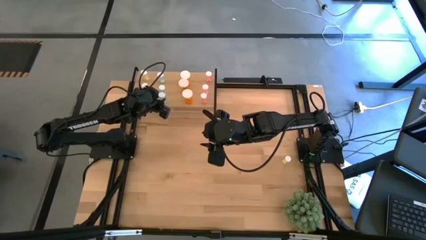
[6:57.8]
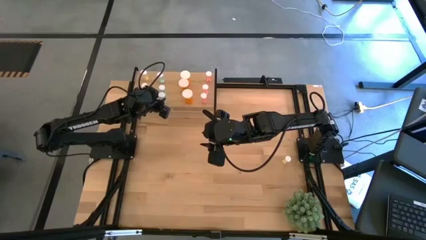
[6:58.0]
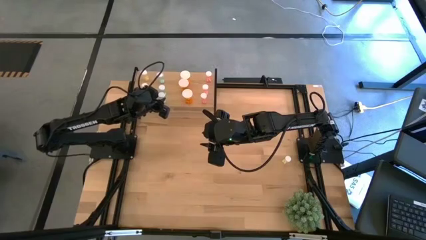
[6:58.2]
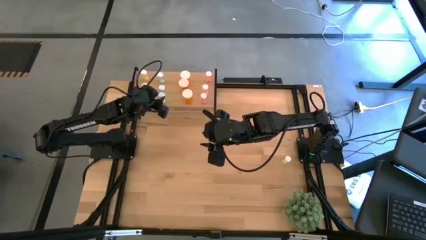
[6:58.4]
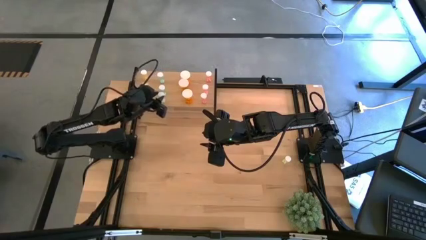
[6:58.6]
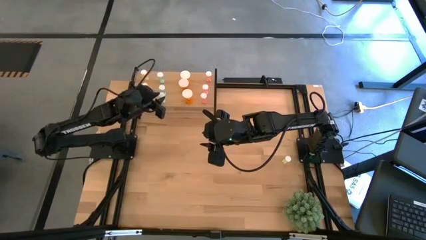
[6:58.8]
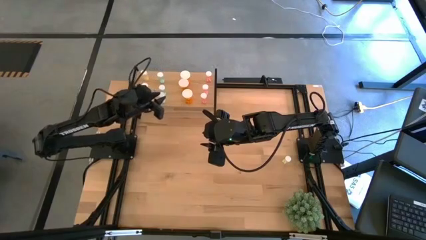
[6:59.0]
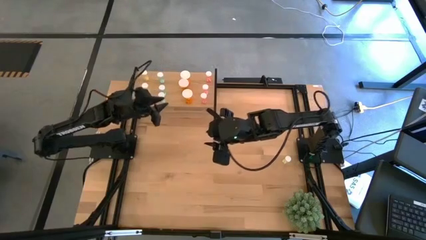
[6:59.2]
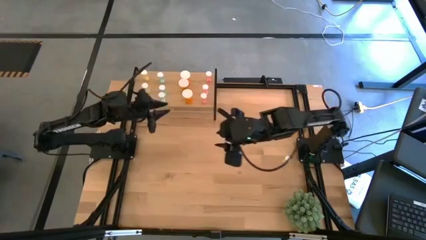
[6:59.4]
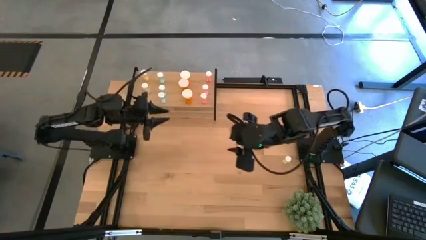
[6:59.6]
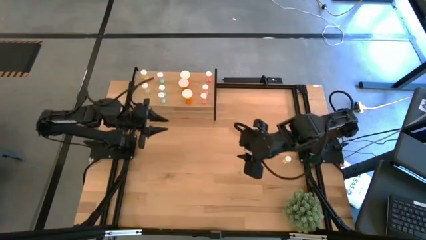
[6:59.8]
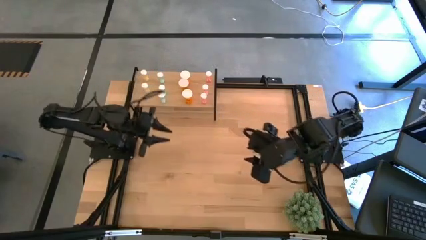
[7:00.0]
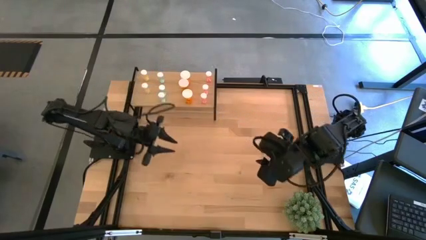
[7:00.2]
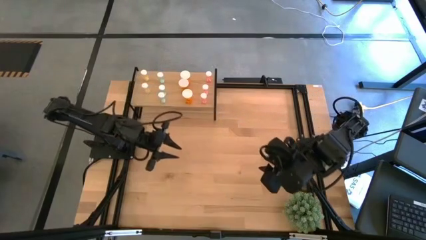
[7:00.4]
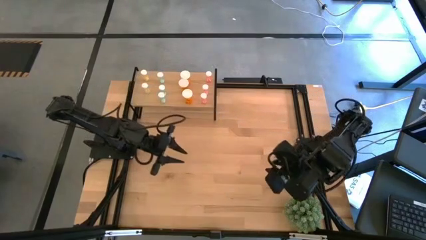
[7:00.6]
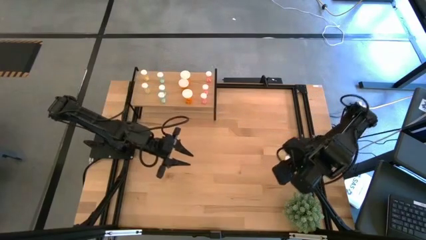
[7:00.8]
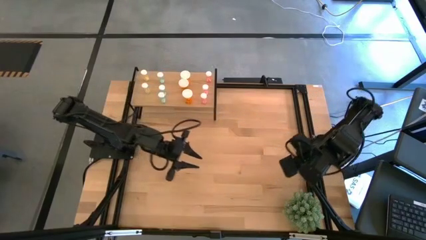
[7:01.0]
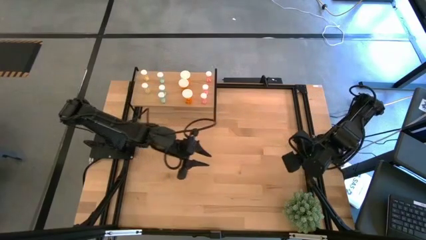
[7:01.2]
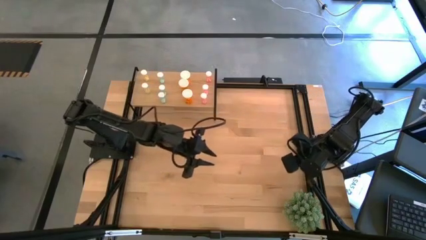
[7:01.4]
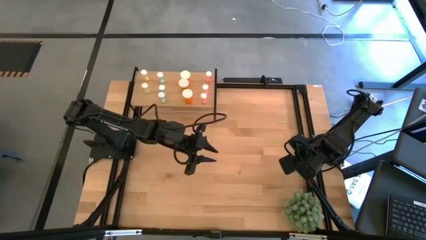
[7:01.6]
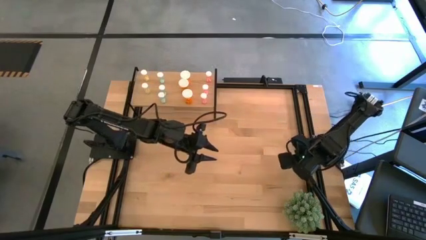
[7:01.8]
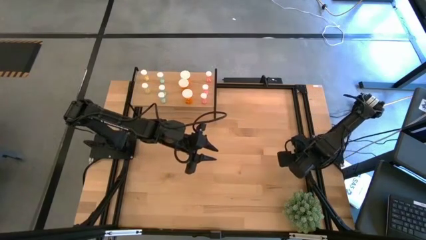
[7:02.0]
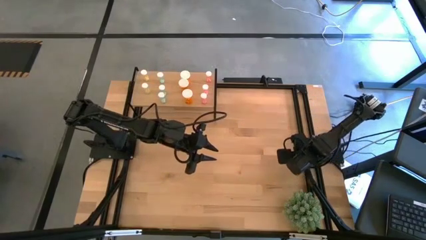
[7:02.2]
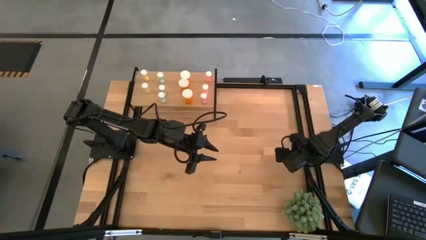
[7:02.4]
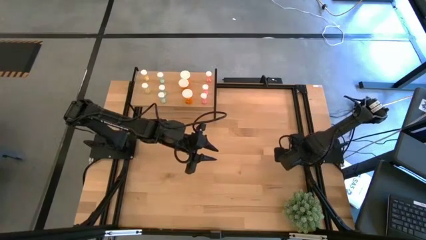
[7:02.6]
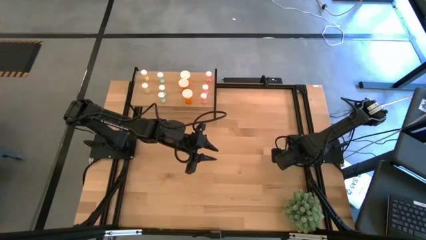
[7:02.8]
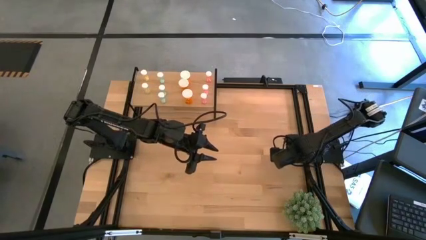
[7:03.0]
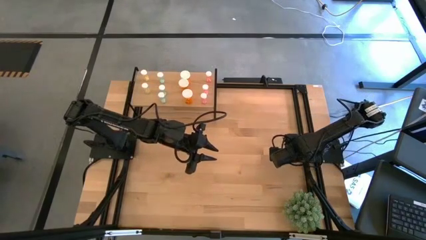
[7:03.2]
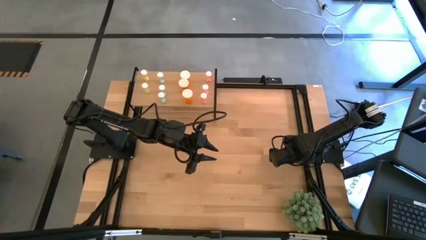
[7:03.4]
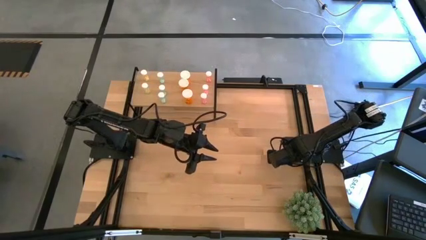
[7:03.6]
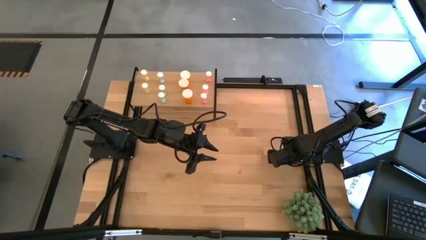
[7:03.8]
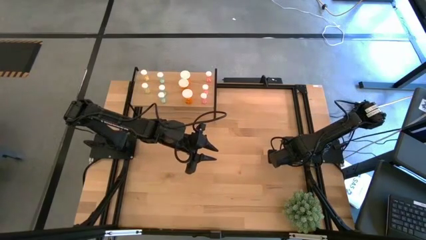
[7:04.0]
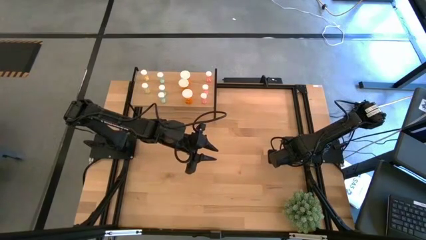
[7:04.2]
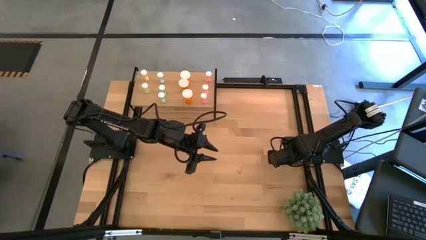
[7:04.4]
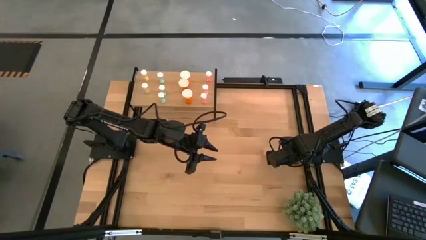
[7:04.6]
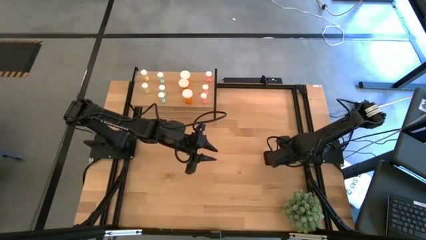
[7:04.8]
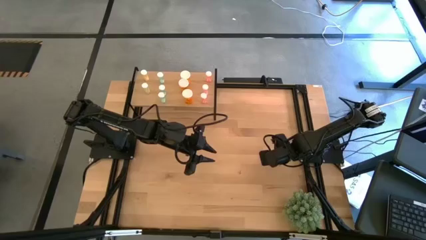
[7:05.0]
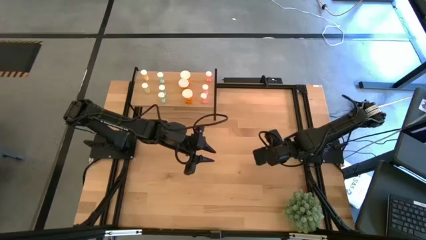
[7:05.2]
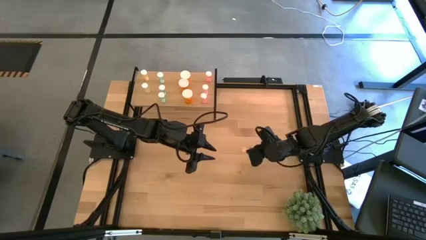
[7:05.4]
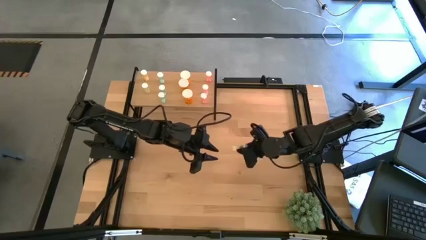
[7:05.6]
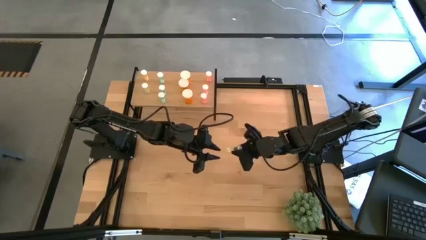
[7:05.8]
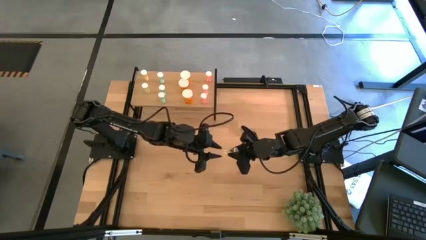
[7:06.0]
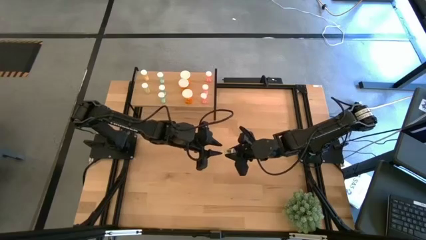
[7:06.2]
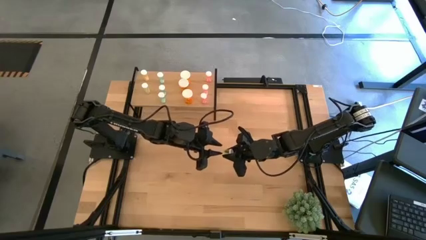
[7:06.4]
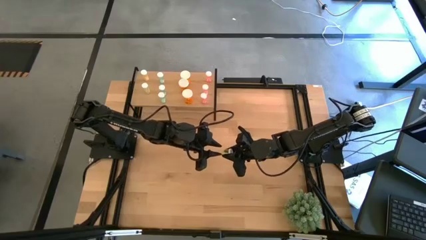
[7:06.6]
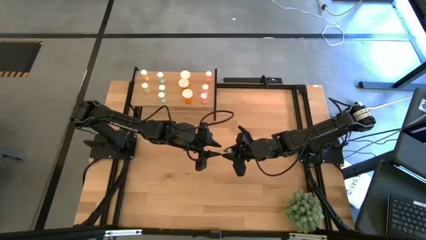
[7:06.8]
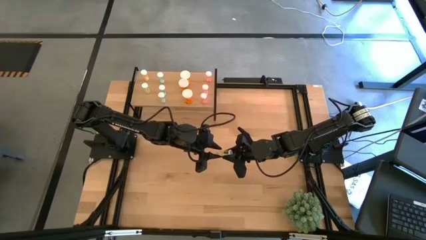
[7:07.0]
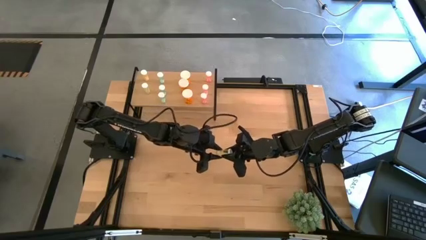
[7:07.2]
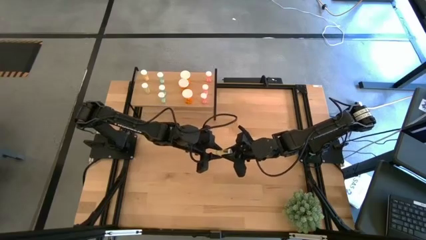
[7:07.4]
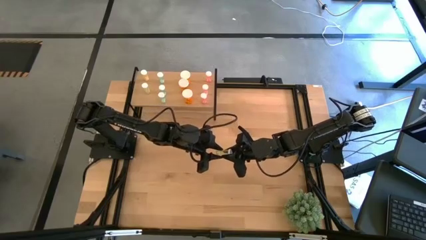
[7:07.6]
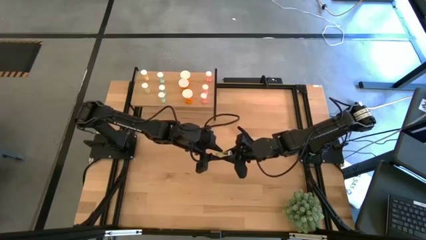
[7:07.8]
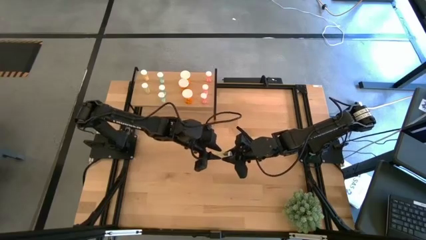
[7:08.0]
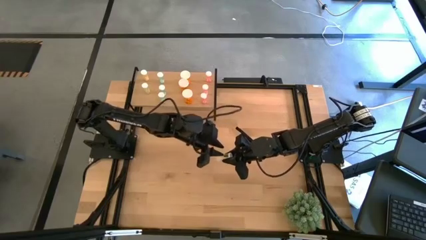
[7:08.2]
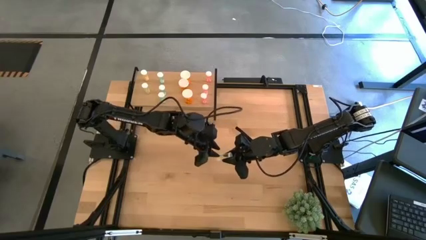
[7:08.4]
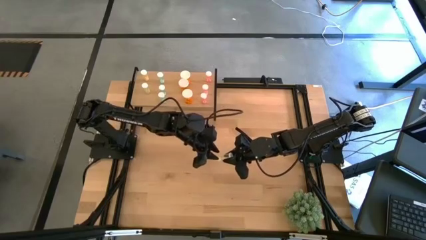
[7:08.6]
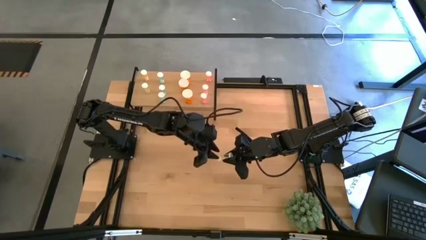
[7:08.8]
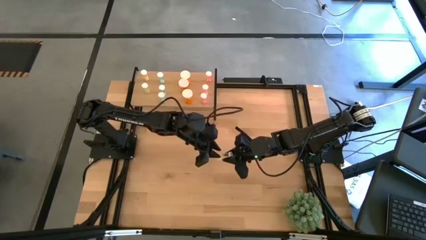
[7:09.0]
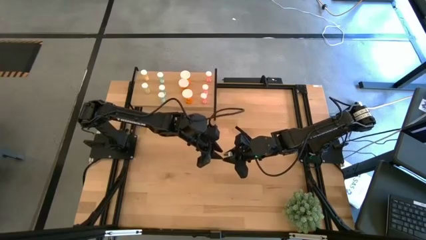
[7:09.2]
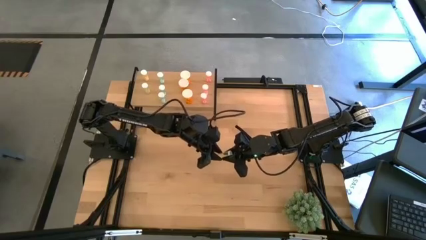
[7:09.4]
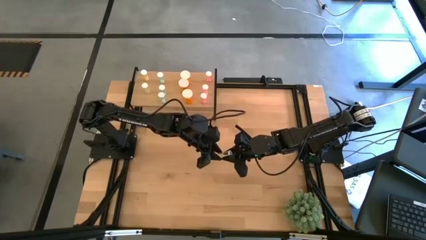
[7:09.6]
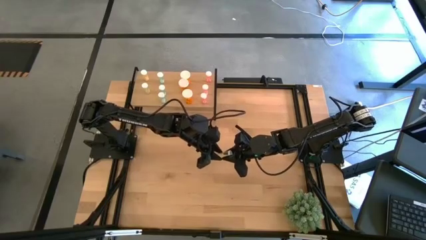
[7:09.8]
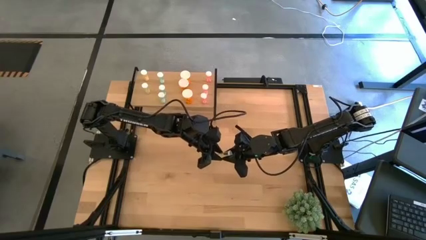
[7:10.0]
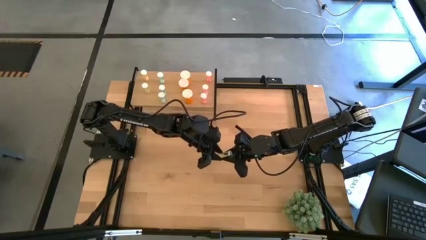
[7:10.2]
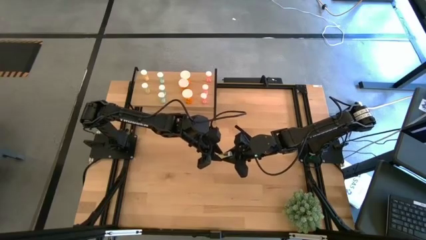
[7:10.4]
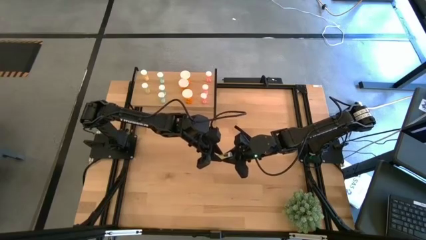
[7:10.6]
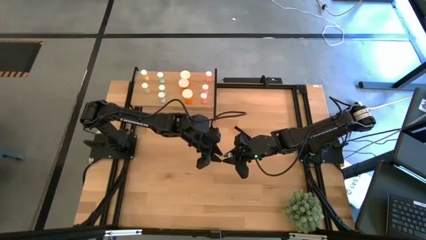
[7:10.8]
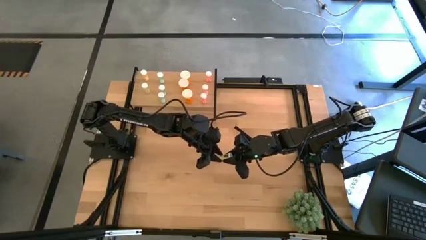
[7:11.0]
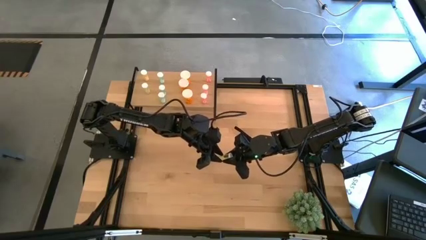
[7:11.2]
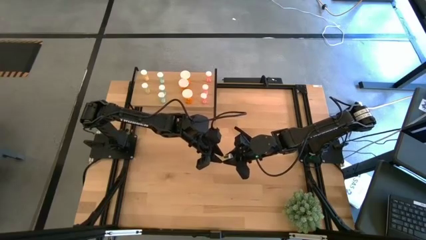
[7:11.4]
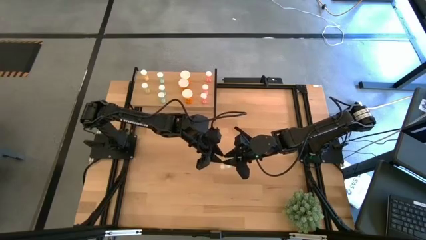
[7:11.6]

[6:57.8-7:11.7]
Task: Pick and place medicine bottles onto shelf by color
Put the yellow pill on the shelf aligned with the yellow pill on the shelf
